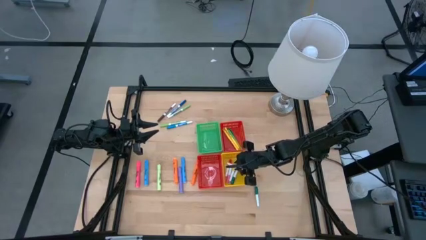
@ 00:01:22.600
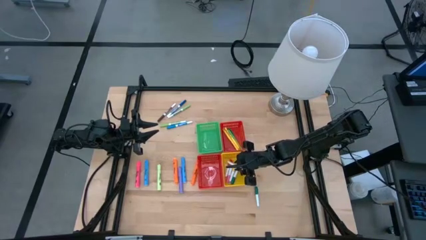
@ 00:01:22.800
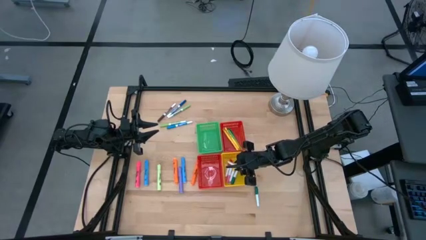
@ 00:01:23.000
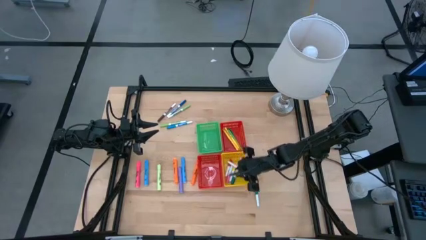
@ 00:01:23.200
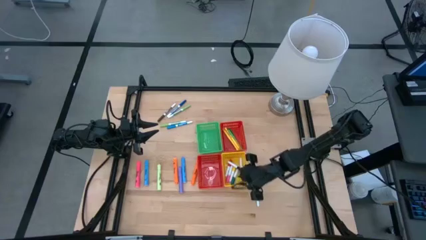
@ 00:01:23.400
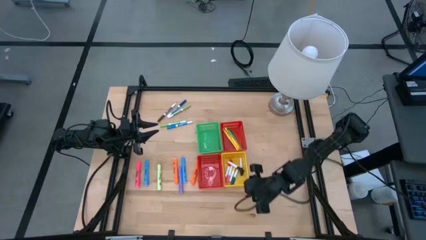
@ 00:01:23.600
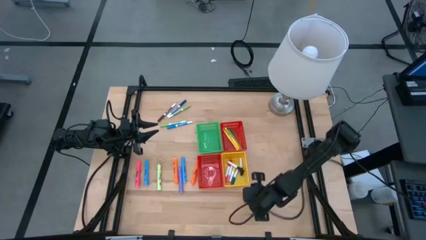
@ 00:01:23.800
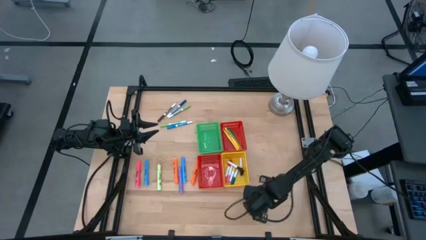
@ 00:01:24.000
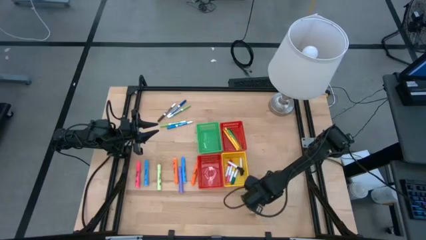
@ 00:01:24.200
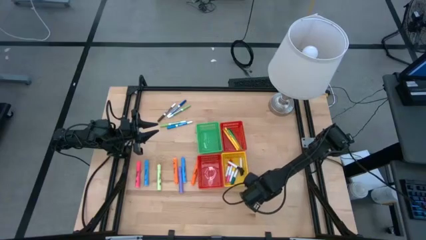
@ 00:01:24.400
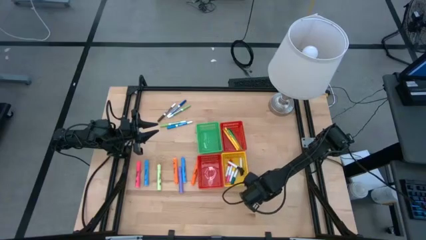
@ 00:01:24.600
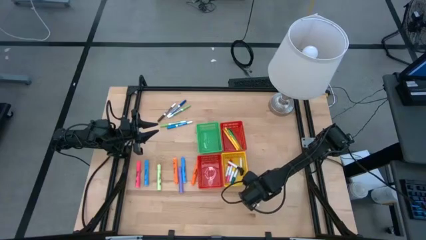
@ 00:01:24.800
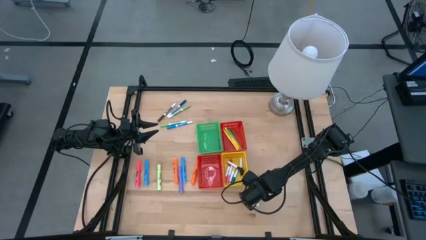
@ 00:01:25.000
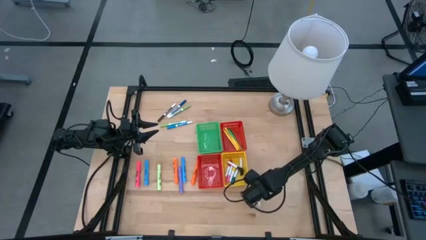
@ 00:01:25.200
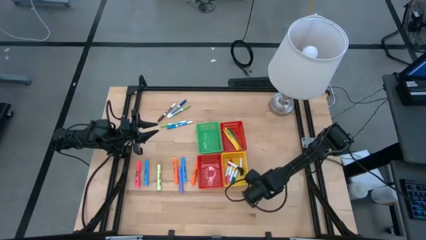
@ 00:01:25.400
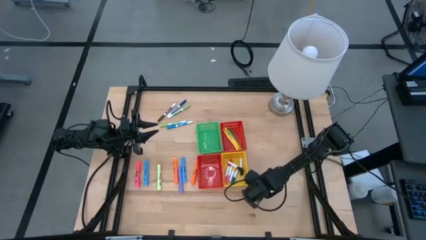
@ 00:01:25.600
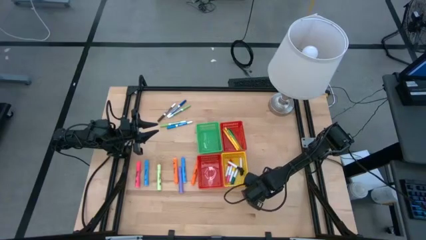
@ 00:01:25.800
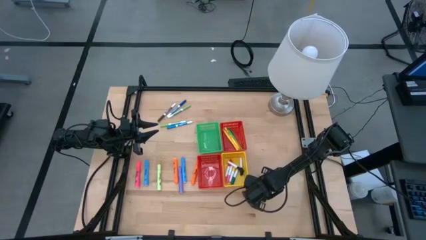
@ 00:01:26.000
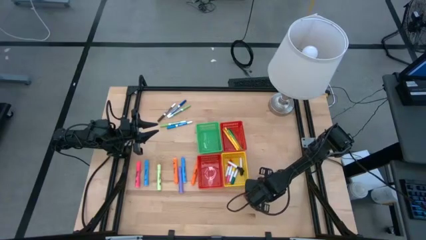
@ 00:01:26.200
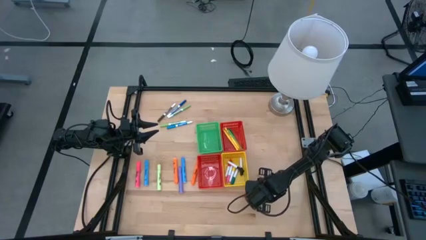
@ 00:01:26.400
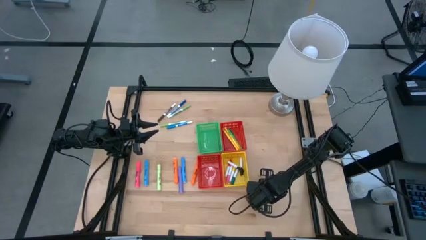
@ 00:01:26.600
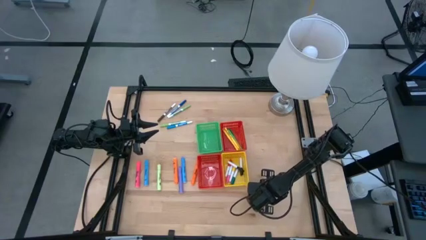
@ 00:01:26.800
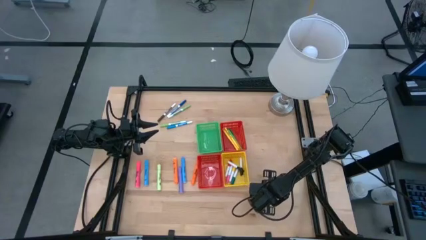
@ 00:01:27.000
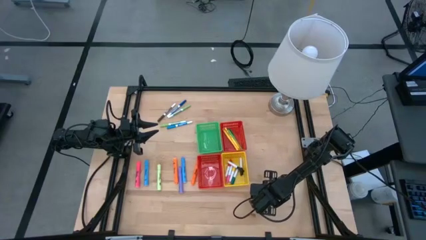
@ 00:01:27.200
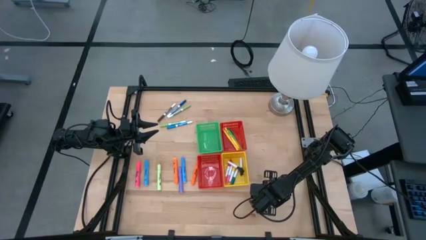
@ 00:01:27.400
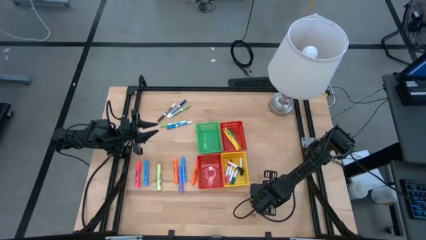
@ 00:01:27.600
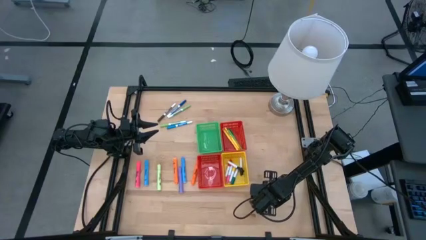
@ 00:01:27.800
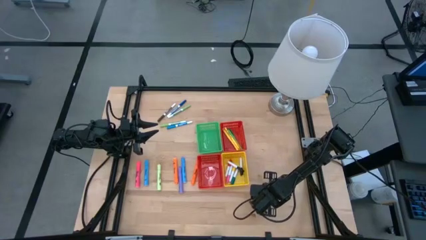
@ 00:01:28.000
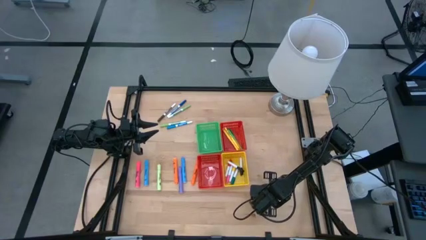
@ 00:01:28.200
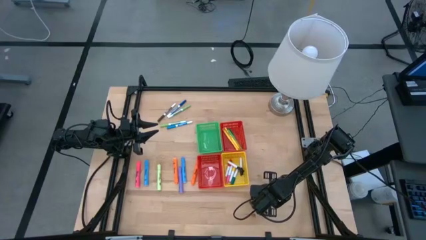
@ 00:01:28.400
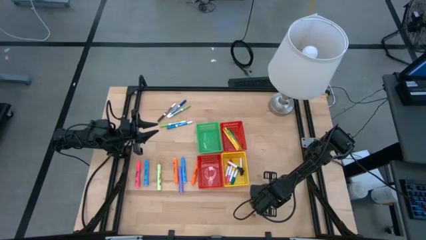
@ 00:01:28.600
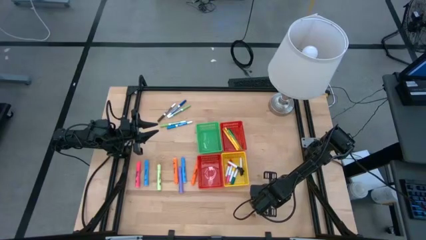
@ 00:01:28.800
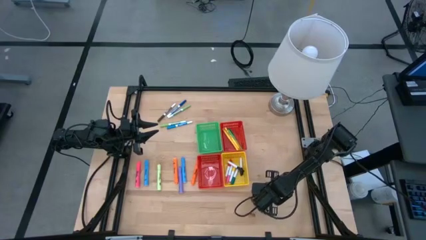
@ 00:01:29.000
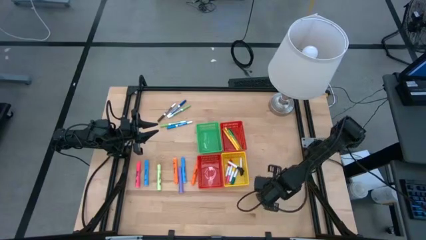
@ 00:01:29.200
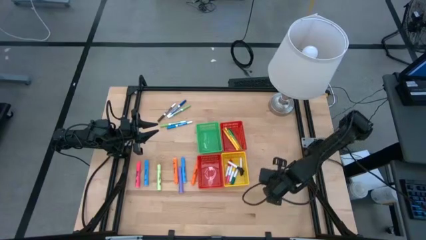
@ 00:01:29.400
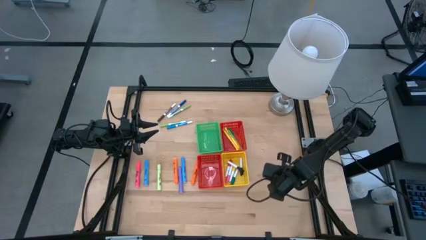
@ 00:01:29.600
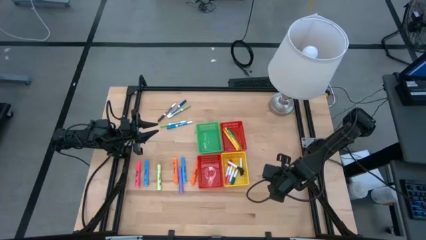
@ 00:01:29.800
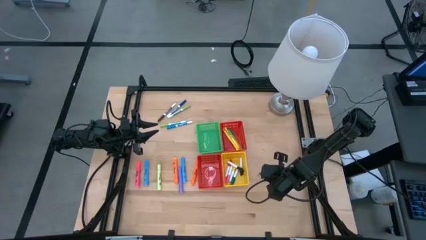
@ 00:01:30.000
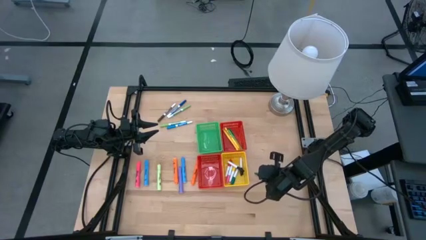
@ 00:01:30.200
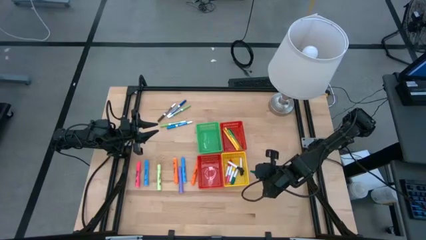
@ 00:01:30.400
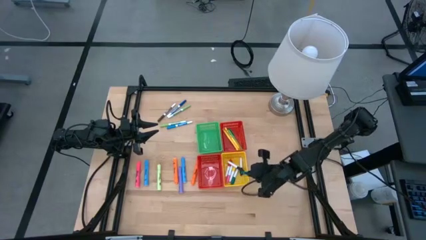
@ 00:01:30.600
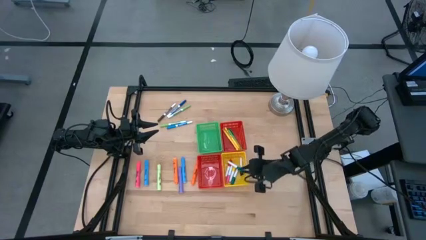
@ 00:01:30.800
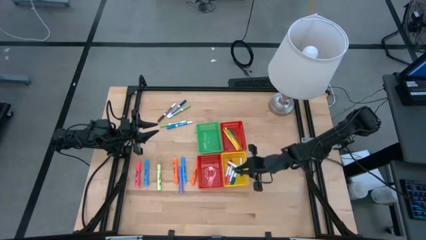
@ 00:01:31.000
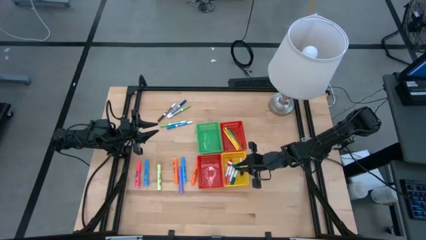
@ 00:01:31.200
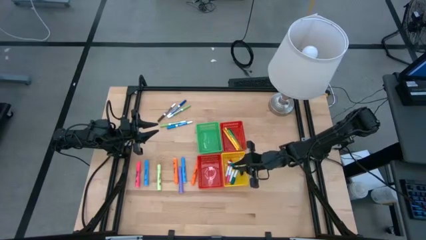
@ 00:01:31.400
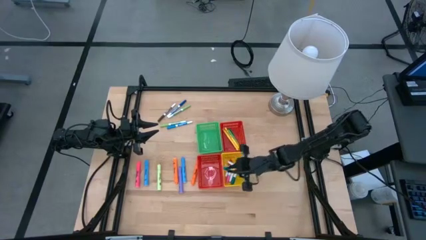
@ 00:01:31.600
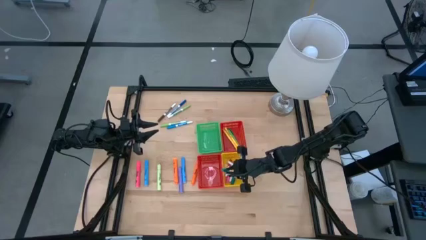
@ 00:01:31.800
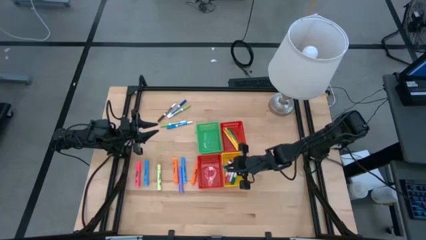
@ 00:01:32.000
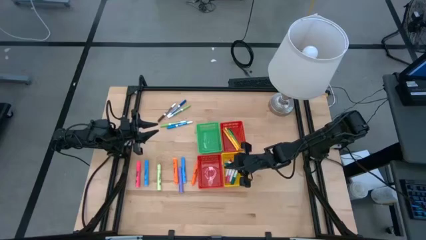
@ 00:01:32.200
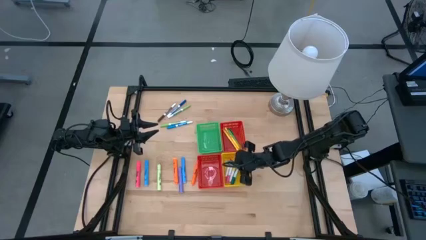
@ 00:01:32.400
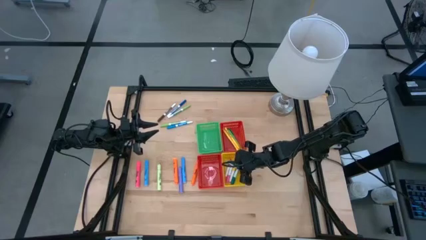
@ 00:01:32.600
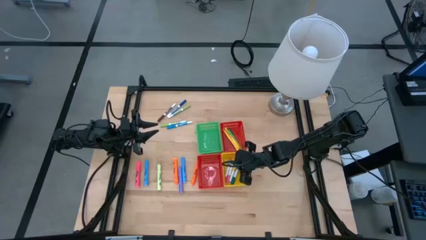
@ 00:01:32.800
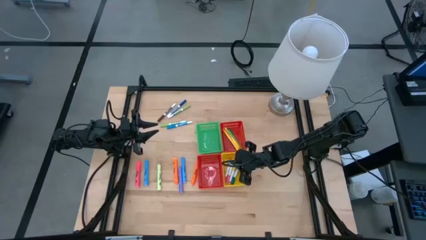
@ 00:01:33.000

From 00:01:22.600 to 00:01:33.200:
Task: Pick & Place Markers
Put the small green highlighter pen into the yellow bin
